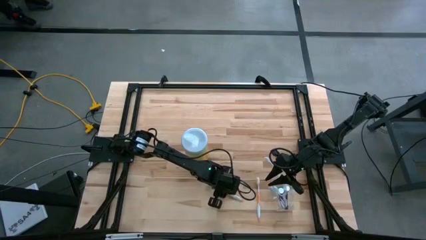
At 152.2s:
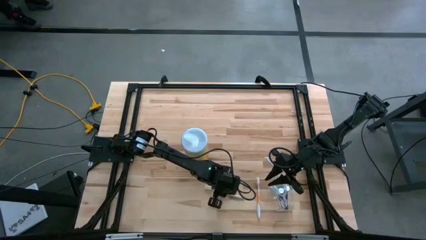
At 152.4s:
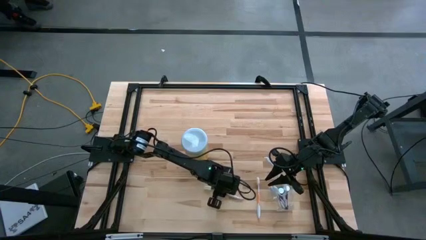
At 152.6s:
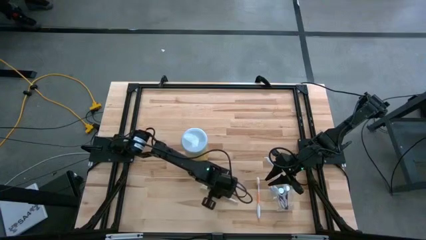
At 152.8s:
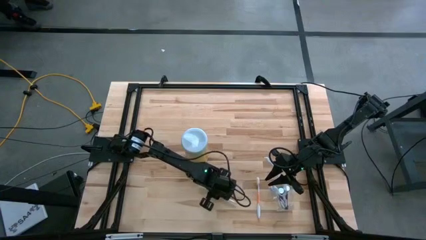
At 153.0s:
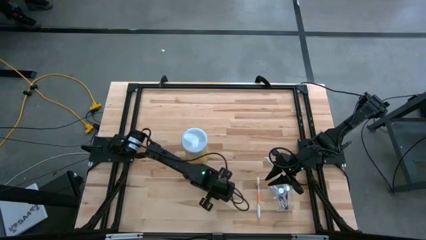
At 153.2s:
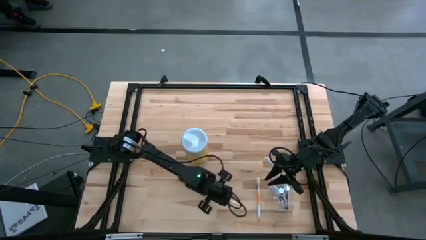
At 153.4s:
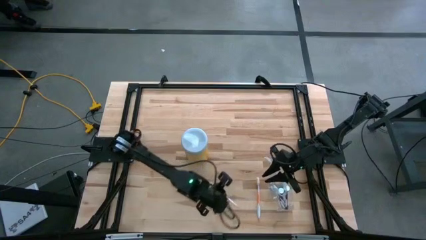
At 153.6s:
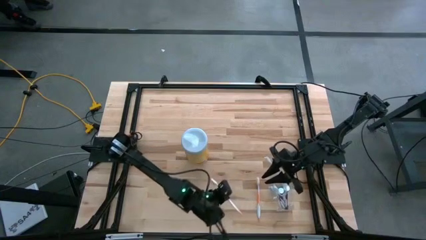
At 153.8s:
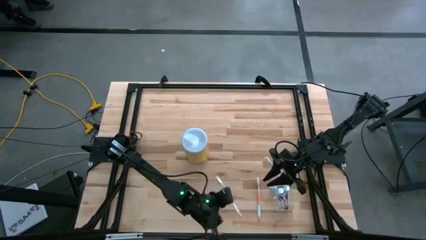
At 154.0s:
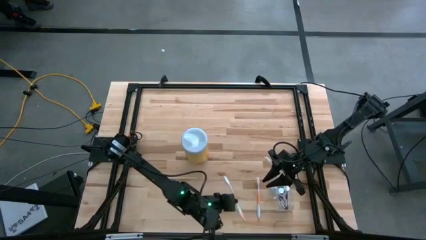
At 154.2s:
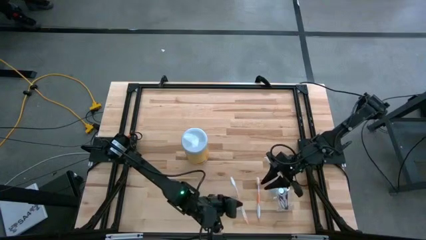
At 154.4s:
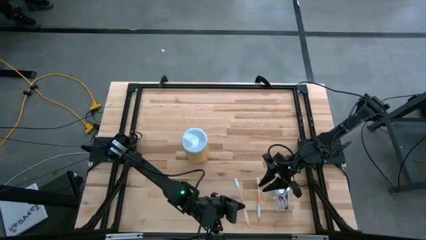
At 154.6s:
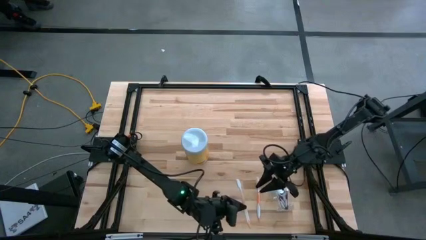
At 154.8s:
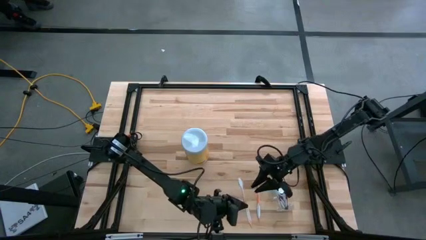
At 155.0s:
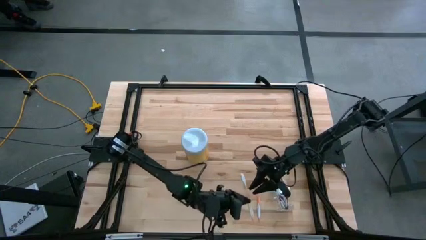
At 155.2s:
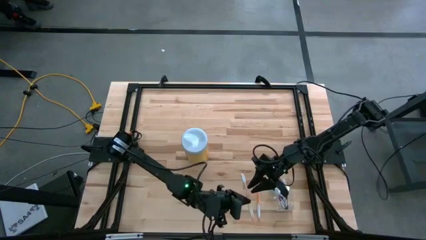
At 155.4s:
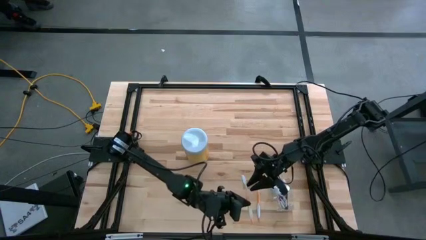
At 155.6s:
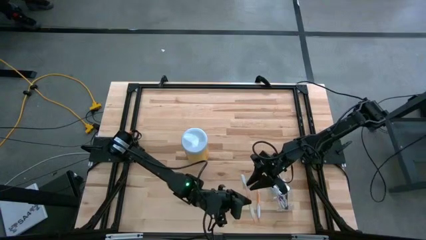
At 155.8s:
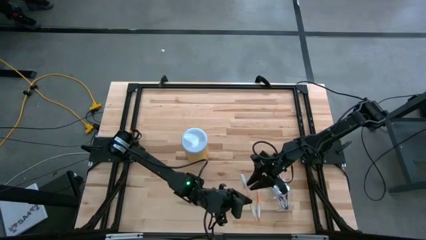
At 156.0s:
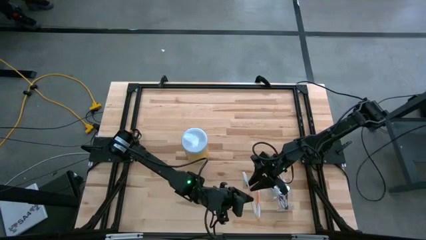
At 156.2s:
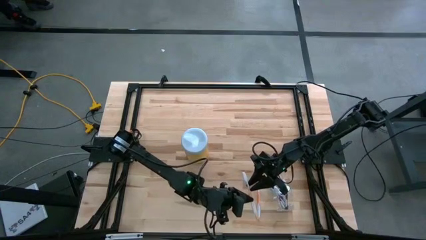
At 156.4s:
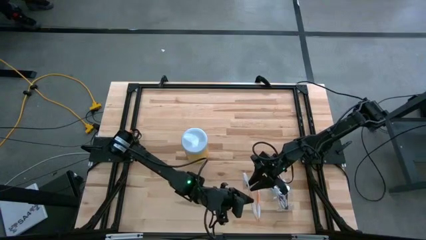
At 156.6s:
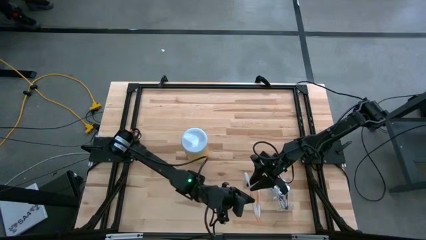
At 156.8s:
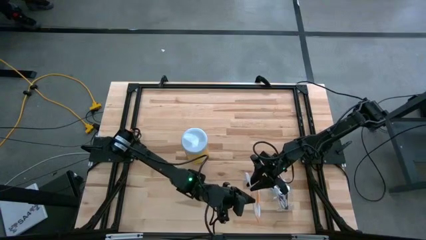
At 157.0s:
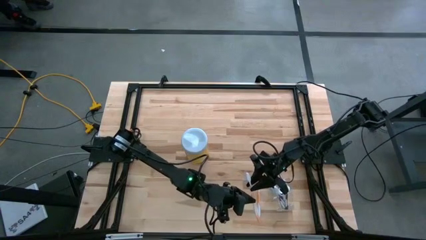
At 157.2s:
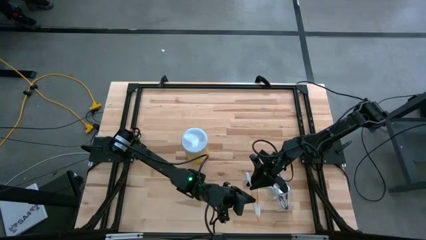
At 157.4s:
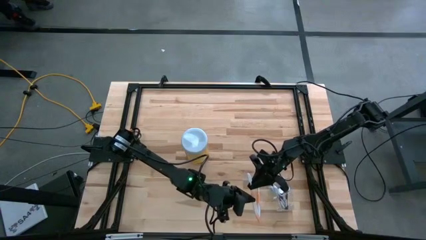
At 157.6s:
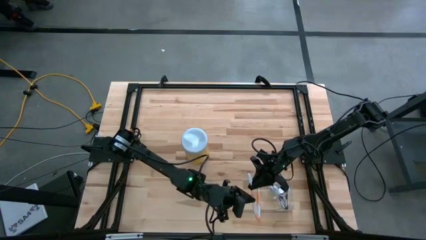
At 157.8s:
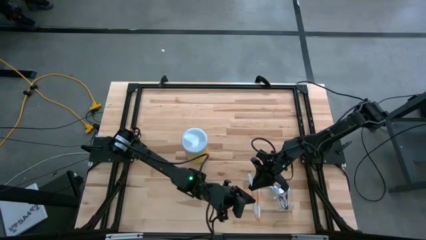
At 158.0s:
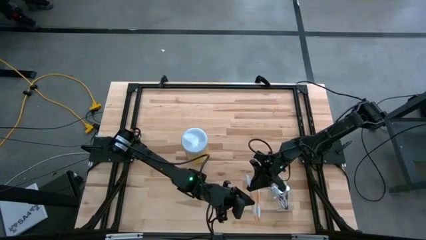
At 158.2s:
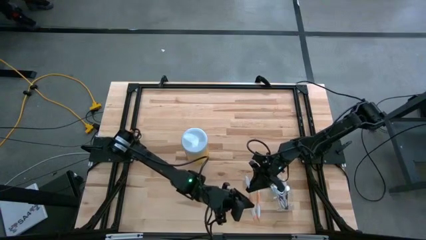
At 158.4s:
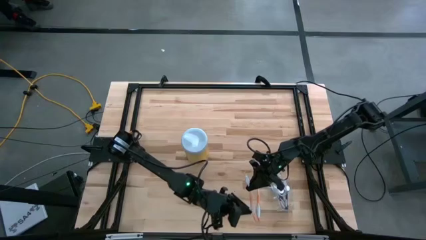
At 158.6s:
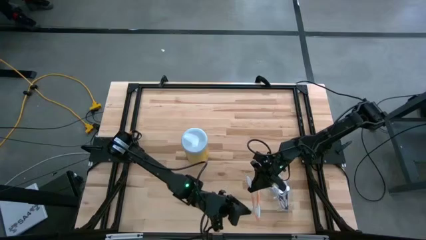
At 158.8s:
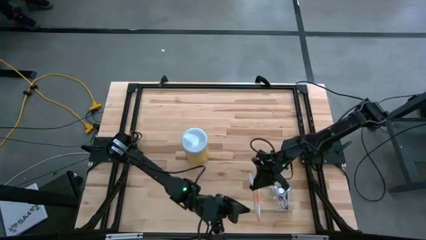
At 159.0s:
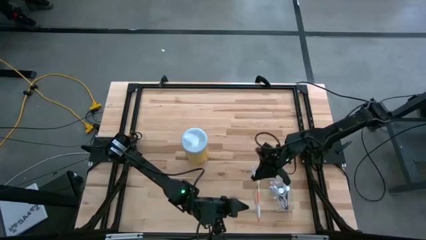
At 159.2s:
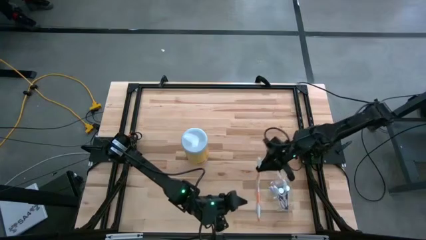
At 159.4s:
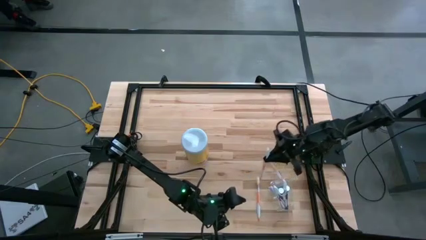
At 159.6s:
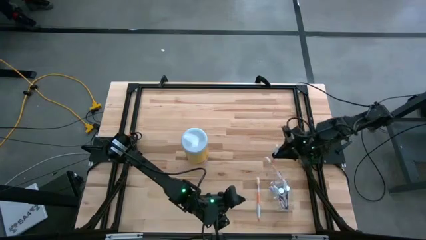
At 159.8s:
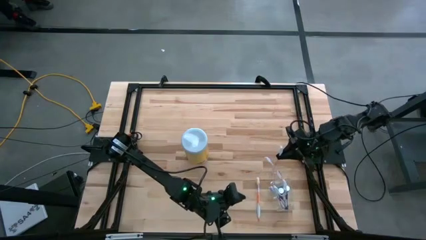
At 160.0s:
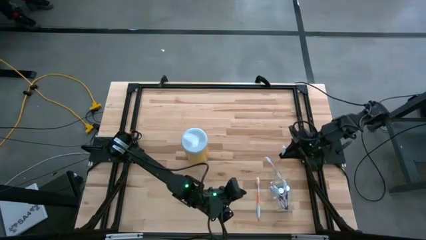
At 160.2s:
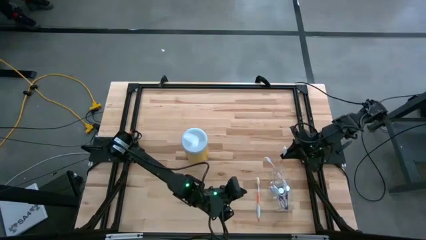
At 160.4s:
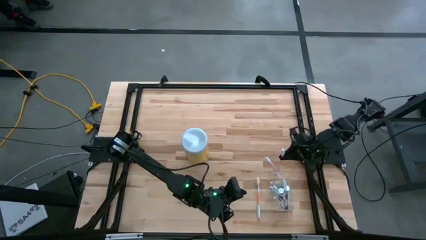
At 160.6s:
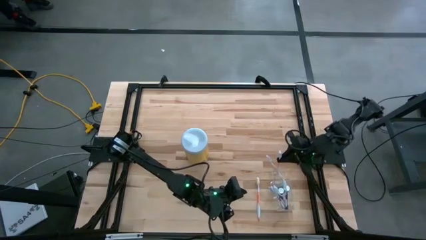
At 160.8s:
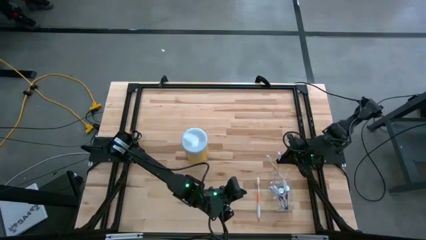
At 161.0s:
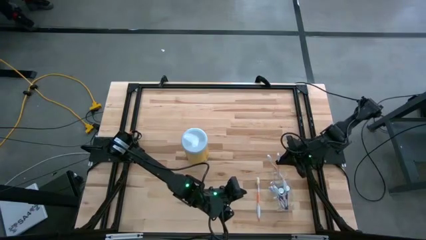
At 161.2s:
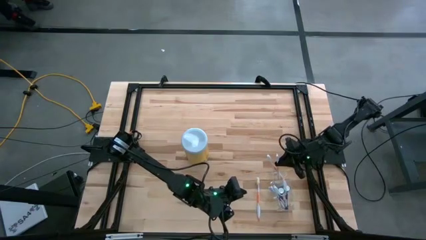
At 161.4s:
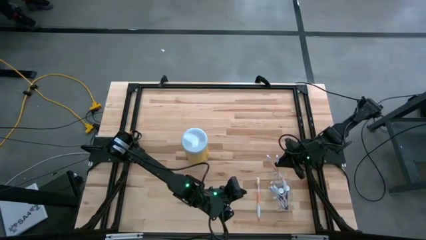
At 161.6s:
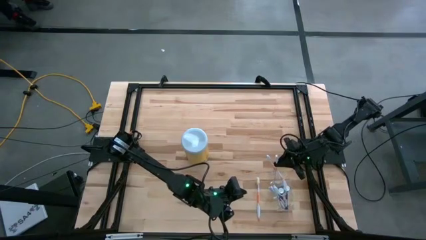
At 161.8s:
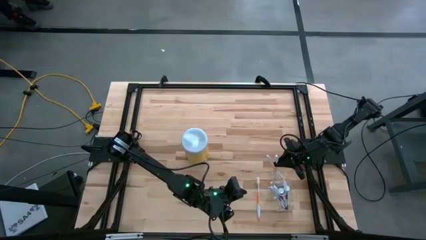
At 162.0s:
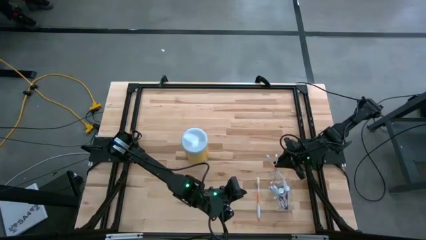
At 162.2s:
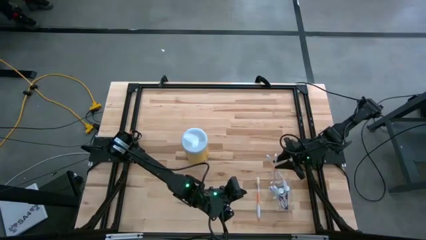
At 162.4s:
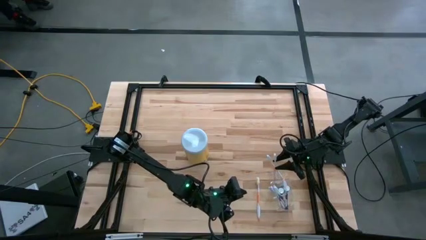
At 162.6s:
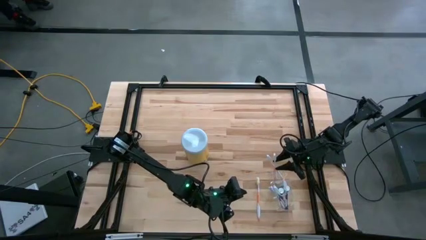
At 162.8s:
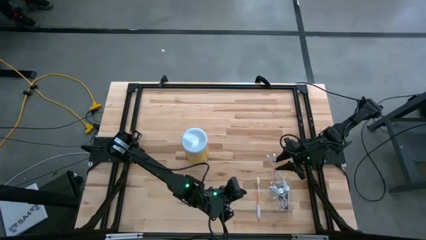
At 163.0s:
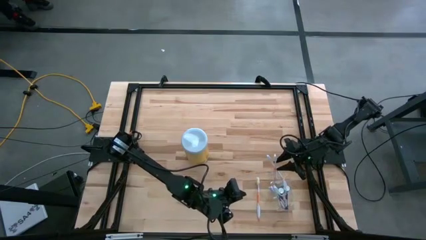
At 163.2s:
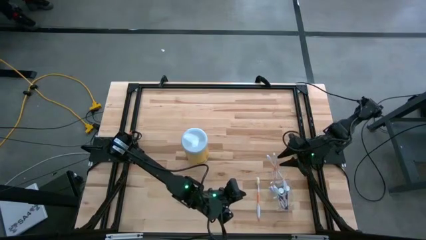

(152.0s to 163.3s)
Task: Pick & Place toothbrushing station
Put the left orange toothbrush in the top section of the transparent organizer

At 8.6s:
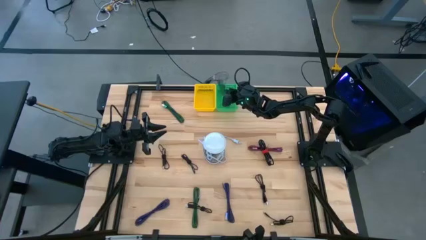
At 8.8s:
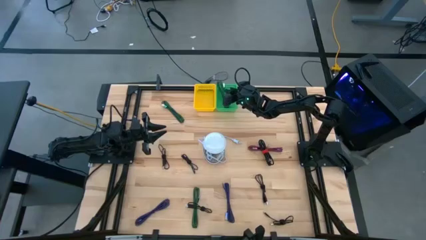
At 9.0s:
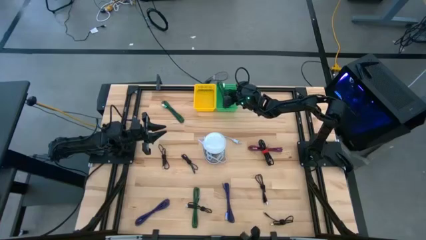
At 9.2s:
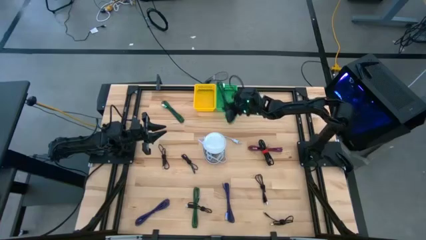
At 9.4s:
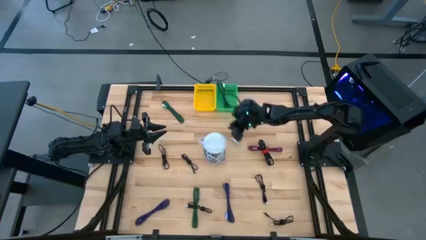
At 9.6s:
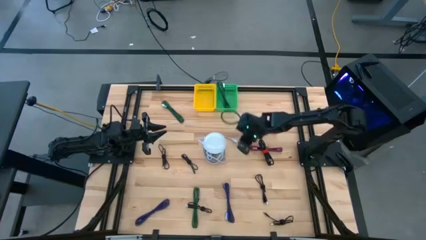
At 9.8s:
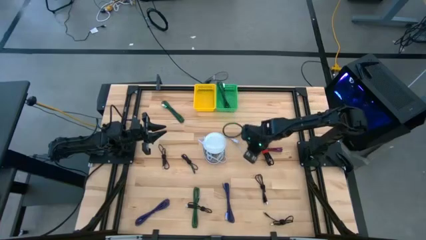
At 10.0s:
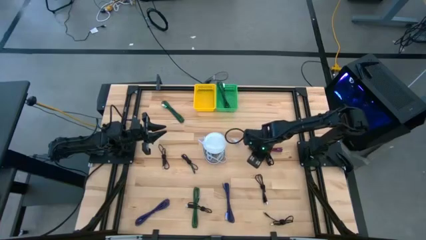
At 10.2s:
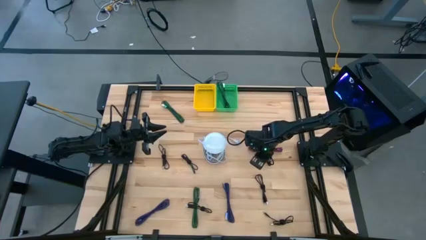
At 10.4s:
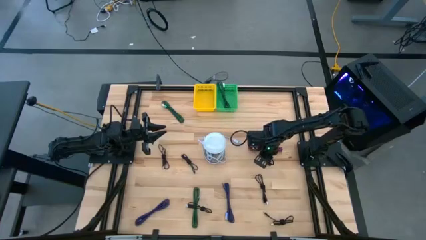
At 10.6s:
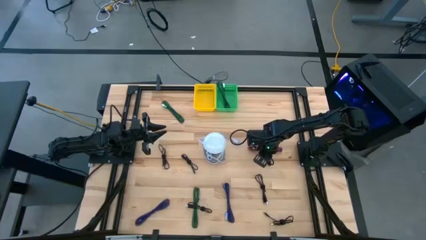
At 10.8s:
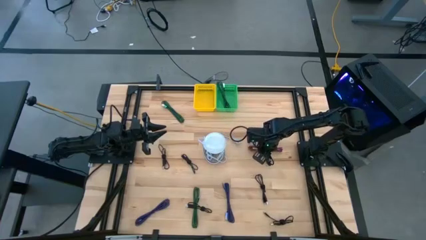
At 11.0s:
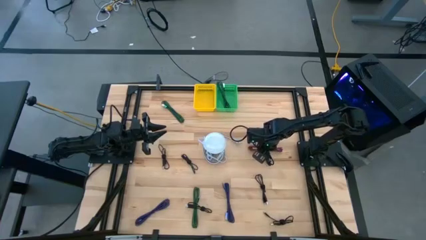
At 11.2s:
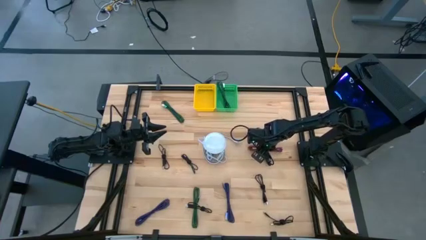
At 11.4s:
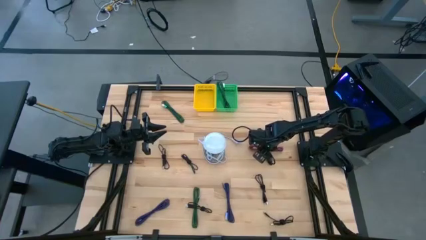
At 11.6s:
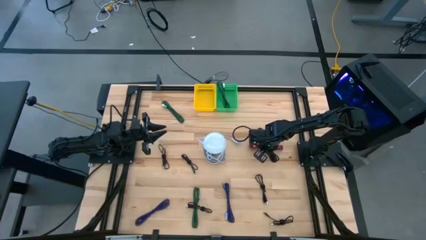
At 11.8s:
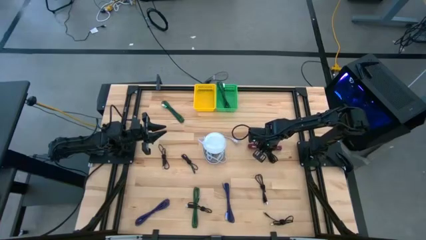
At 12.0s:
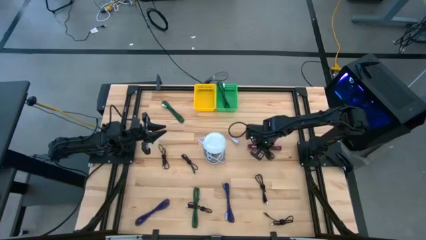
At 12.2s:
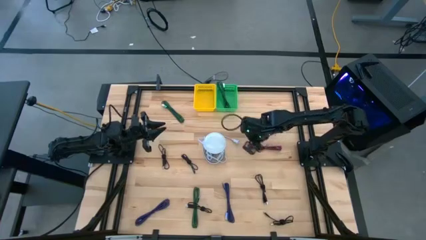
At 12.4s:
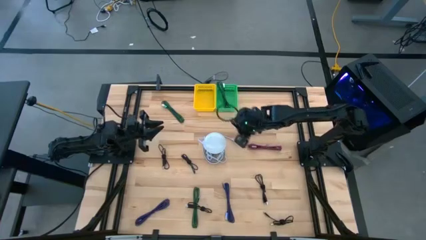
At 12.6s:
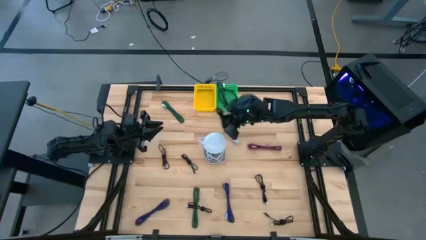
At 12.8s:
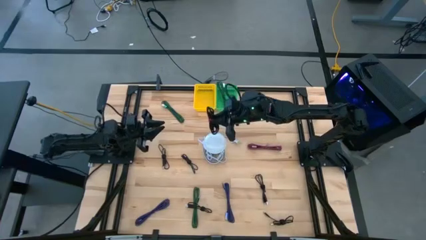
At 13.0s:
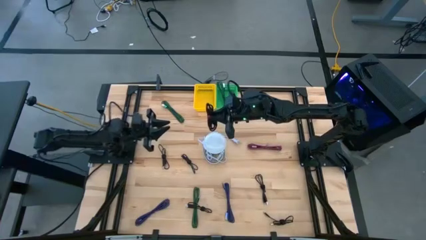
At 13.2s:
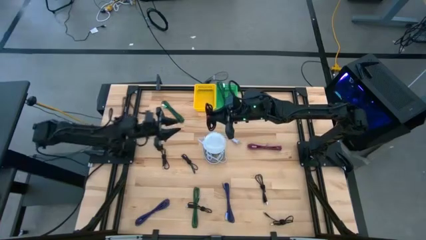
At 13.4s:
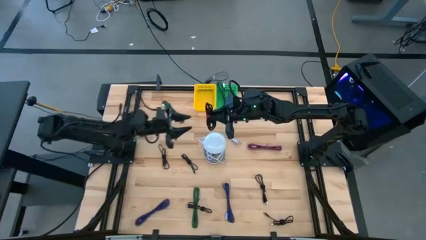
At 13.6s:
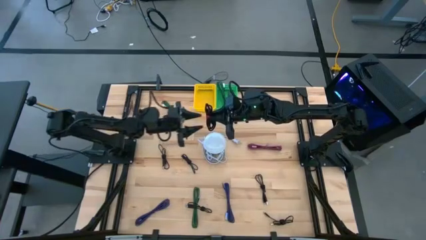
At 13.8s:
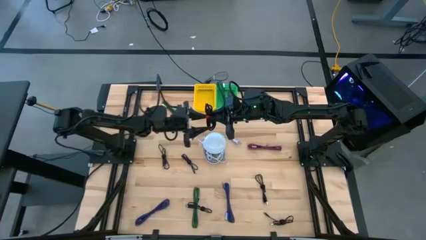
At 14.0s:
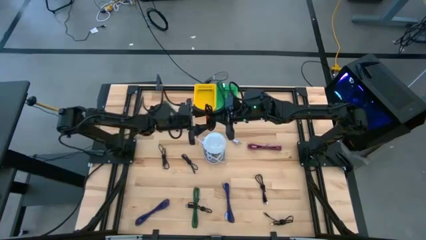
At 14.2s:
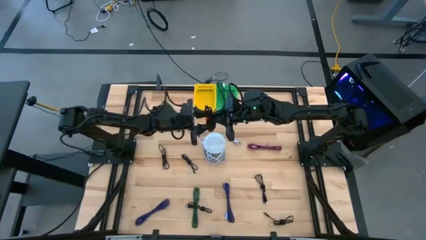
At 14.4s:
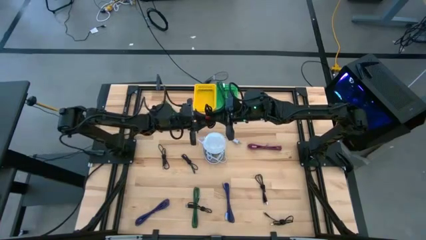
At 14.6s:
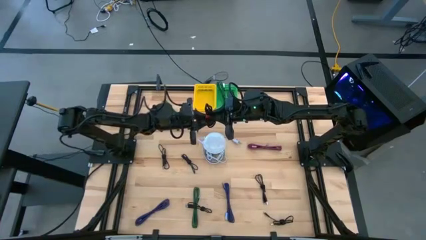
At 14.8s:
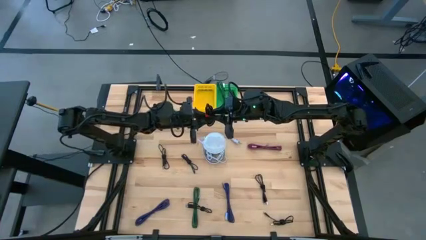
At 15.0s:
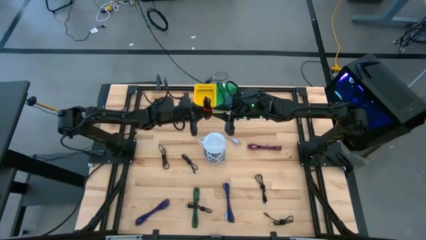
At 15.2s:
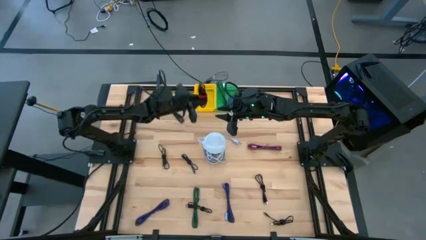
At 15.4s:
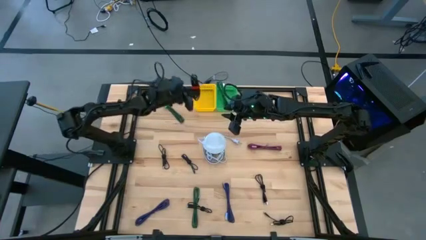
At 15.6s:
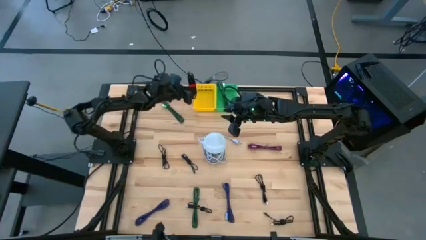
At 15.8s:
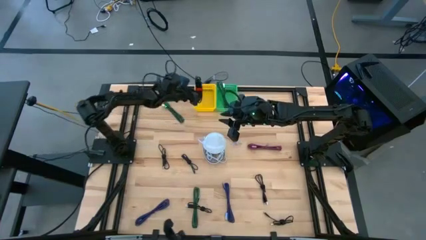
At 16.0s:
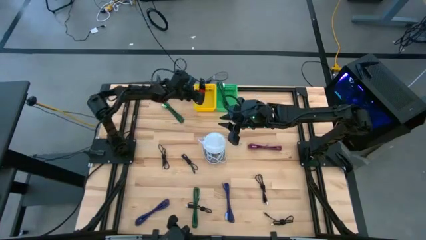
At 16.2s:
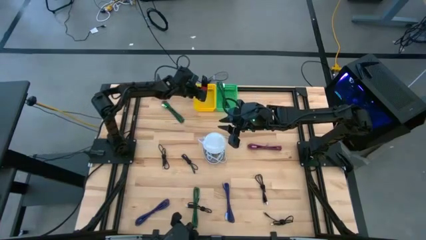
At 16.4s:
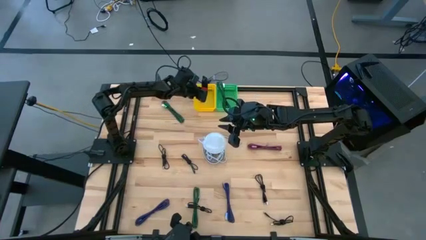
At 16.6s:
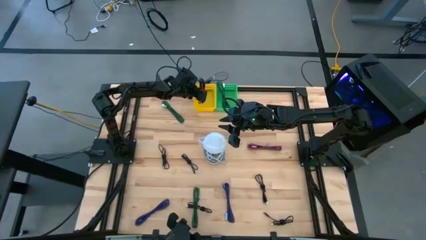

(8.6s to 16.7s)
Task: Pick & Place USB Port
Put the black charger cable into the yellow bin
